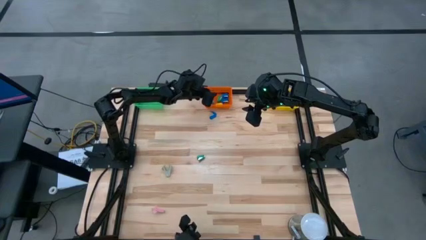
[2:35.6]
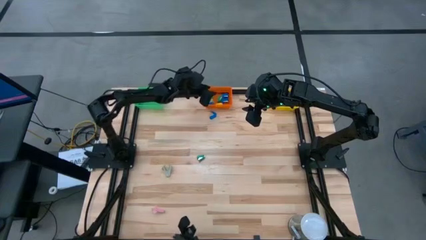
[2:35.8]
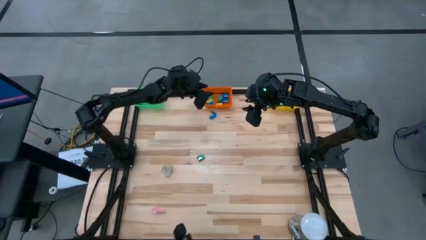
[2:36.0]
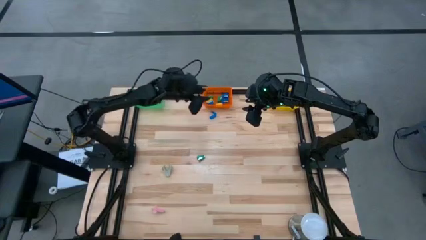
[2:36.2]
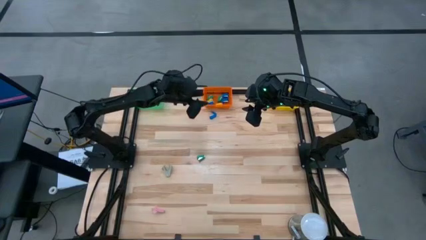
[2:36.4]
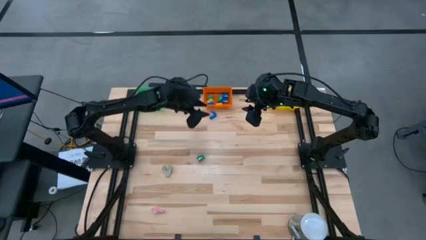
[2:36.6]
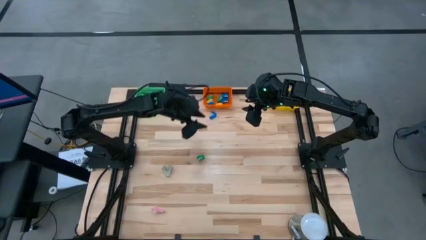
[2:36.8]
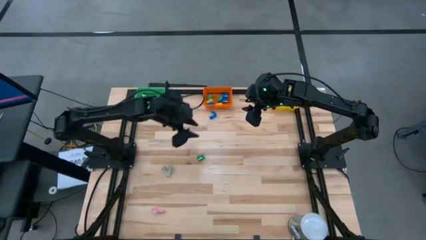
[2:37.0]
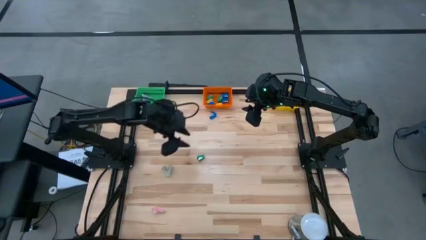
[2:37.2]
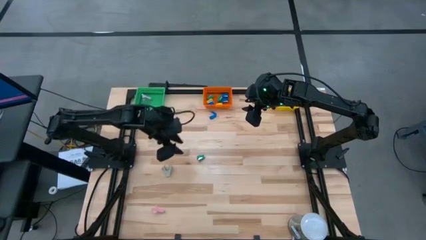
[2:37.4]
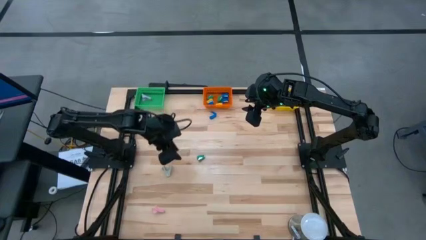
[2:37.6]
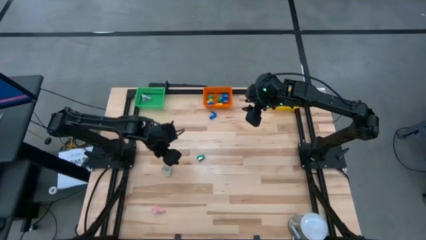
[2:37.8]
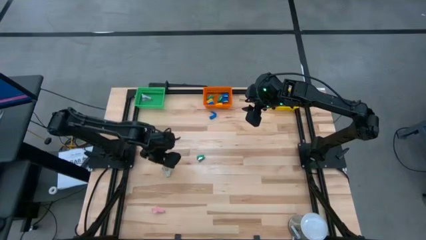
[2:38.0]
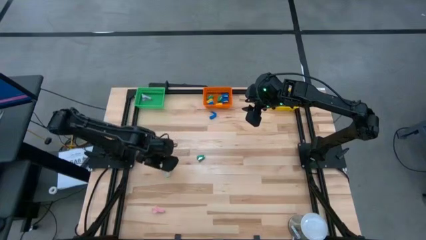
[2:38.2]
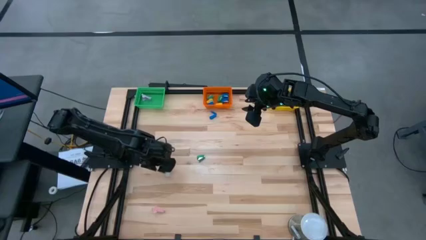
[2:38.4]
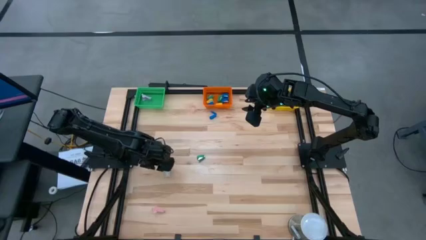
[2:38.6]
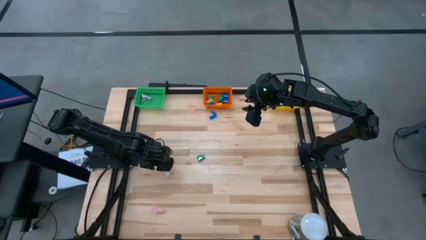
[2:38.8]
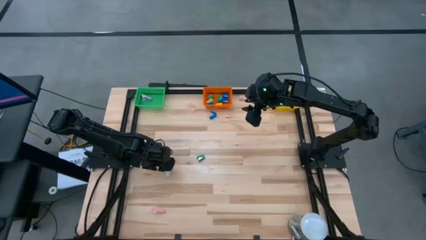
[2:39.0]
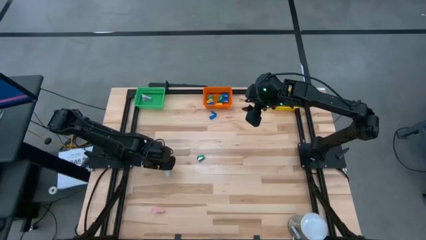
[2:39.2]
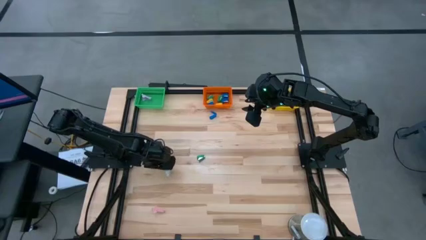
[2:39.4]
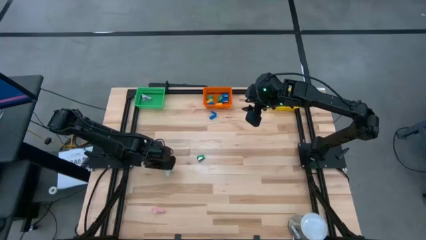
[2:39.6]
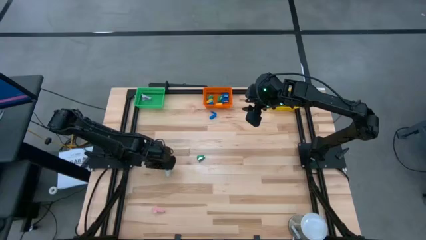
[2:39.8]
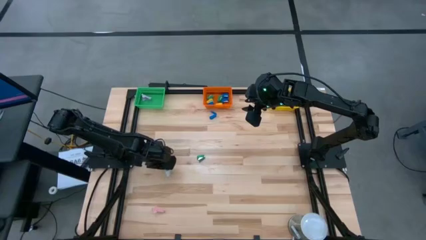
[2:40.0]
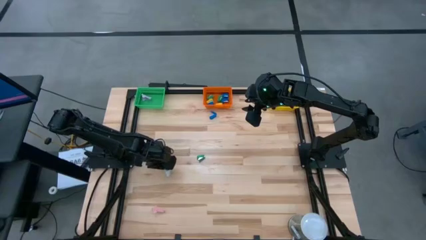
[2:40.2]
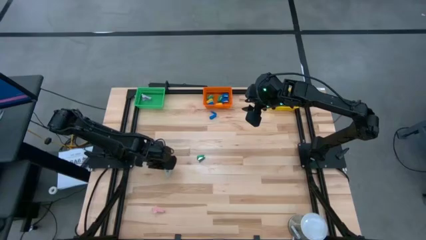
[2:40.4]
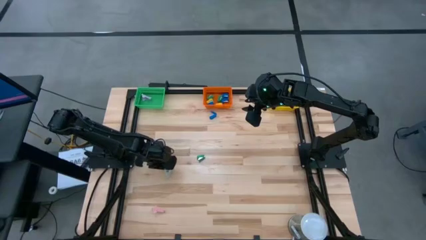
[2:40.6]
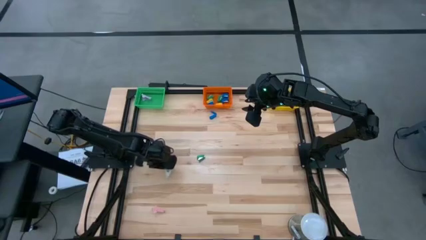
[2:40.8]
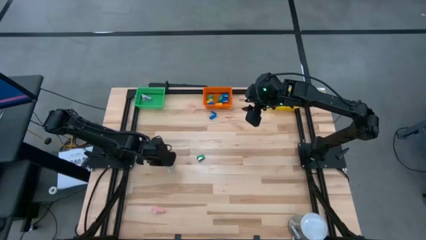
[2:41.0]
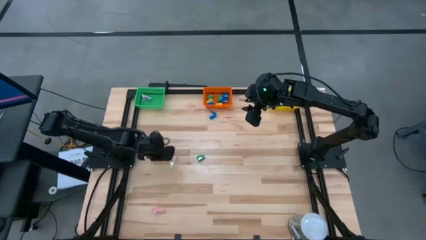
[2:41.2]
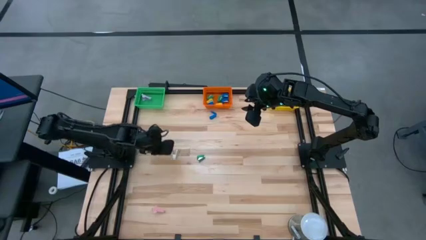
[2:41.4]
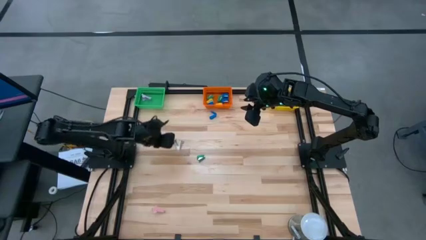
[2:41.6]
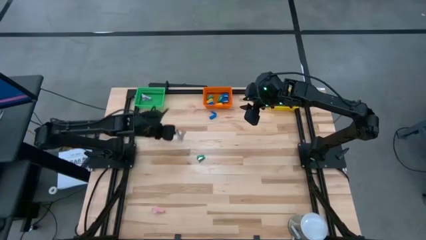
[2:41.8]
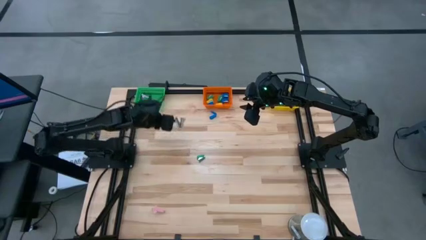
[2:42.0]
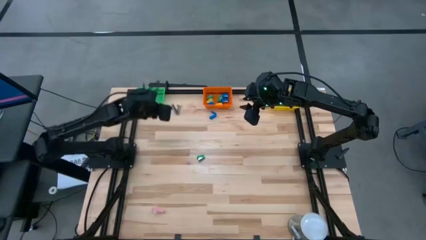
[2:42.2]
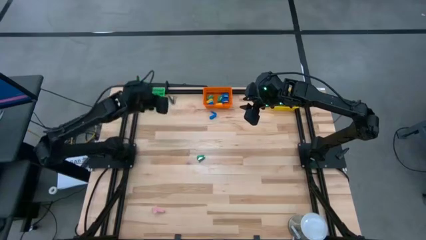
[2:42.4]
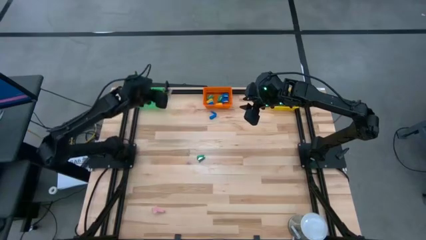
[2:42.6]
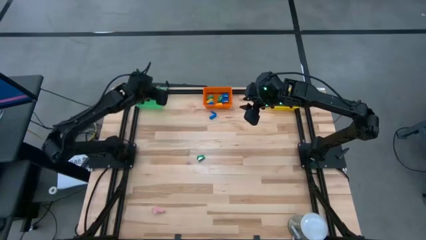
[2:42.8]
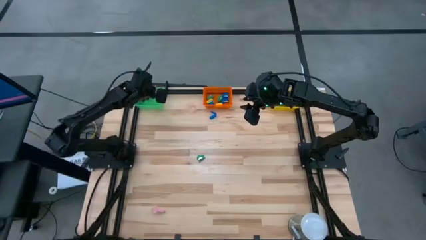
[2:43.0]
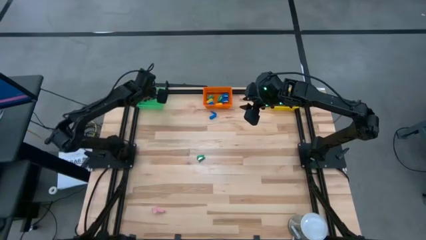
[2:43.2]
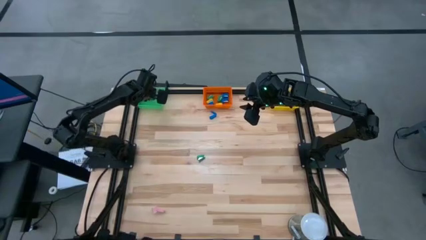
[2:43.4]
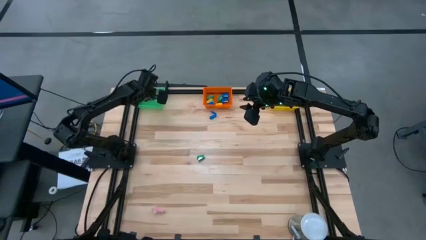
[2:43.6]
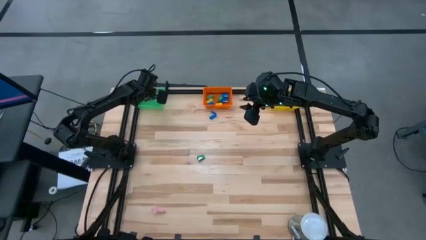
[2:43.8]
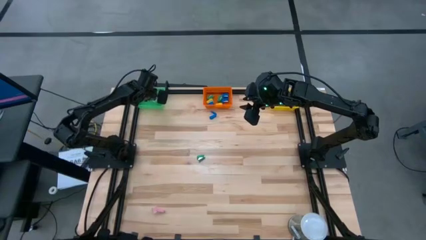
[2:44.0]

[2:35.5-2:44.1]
Task: Pick and place Stapler, Stapler remover, tape
Put the gray staple remover into the green bin

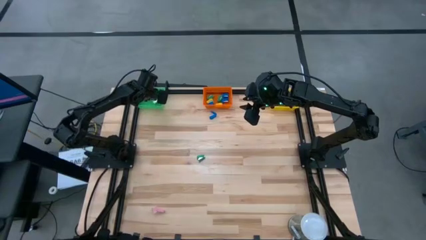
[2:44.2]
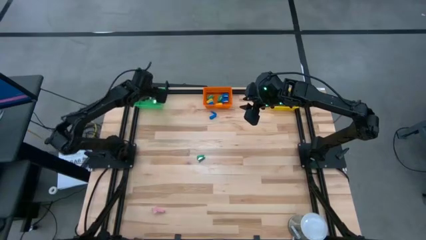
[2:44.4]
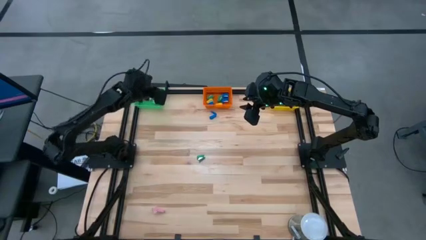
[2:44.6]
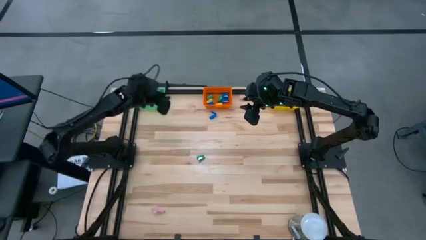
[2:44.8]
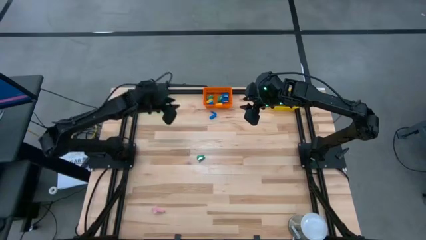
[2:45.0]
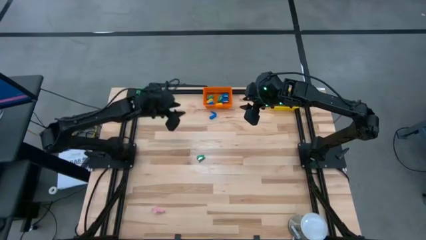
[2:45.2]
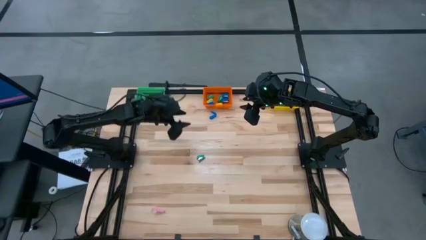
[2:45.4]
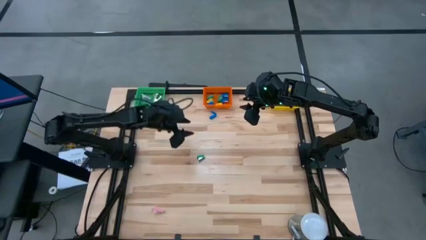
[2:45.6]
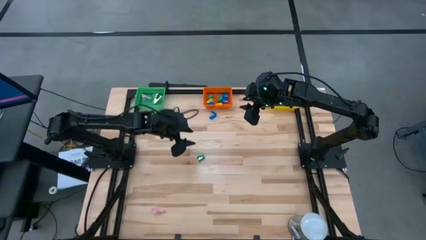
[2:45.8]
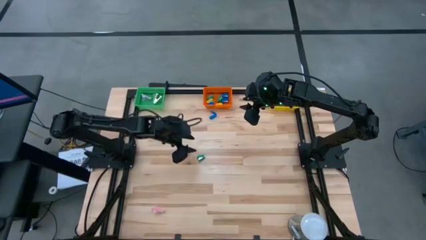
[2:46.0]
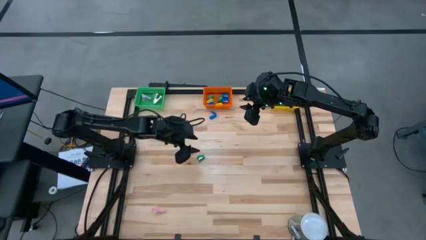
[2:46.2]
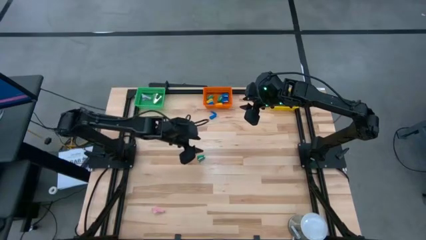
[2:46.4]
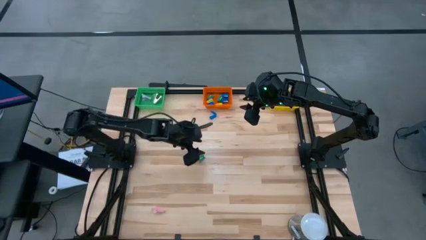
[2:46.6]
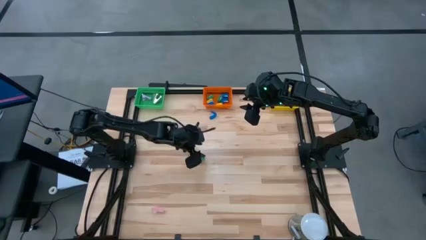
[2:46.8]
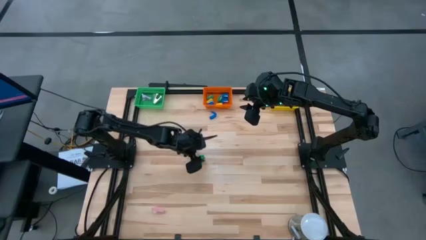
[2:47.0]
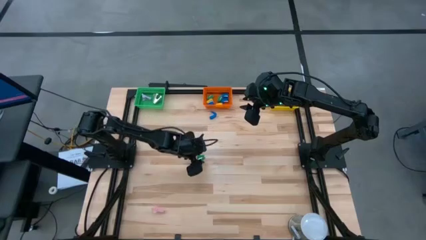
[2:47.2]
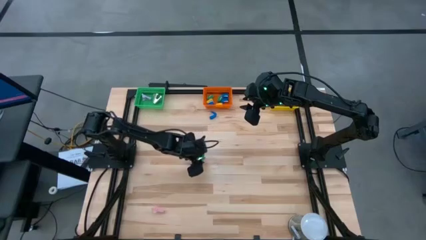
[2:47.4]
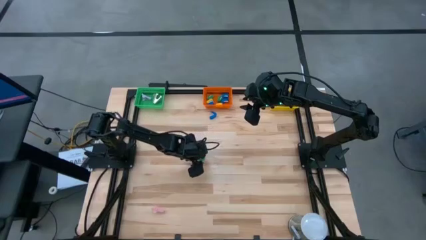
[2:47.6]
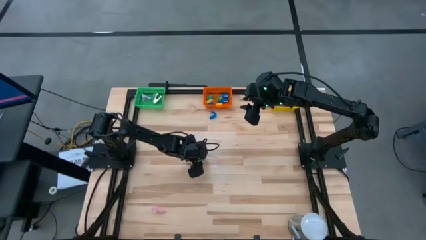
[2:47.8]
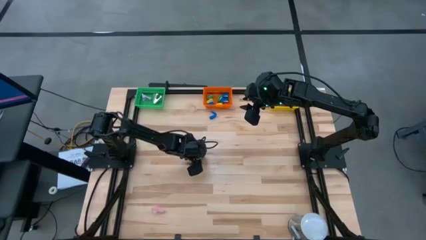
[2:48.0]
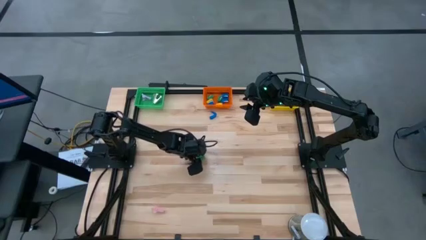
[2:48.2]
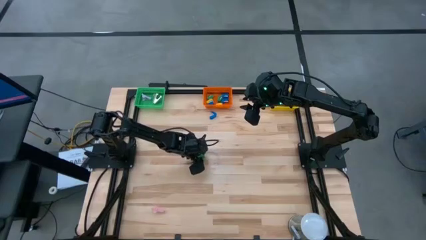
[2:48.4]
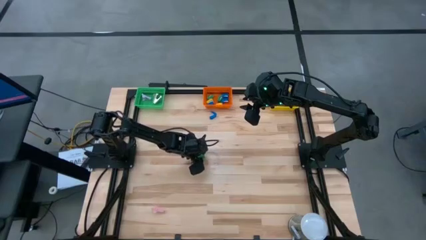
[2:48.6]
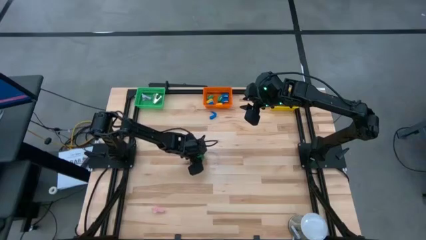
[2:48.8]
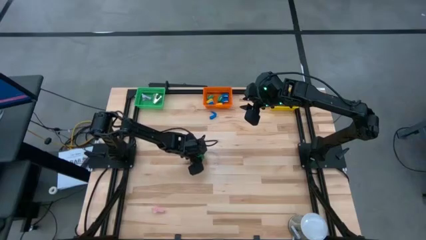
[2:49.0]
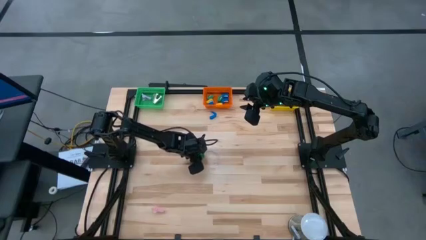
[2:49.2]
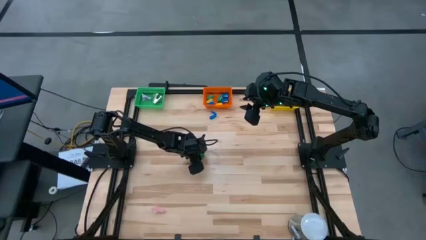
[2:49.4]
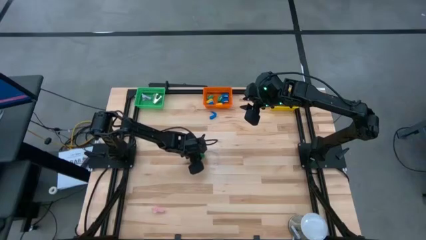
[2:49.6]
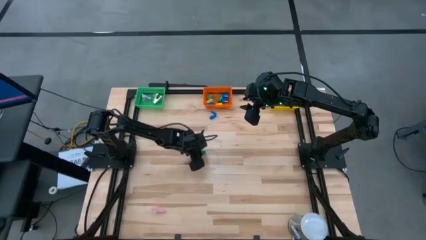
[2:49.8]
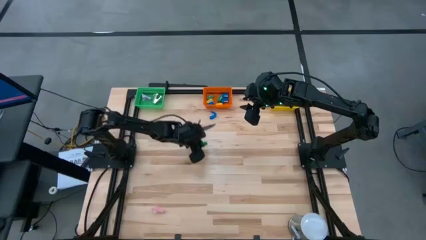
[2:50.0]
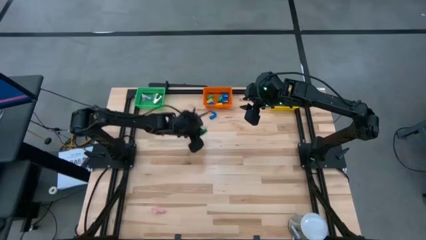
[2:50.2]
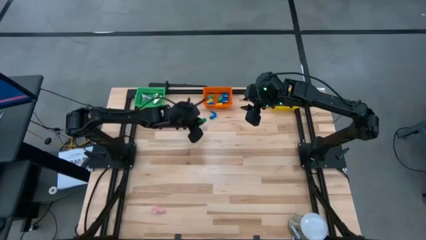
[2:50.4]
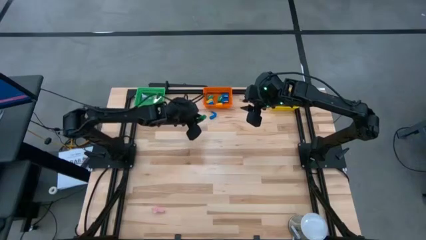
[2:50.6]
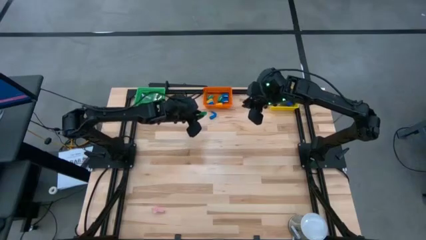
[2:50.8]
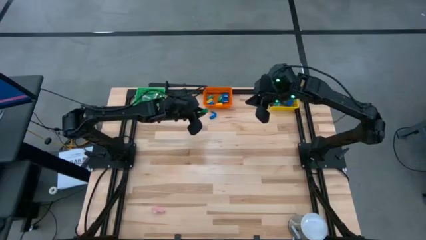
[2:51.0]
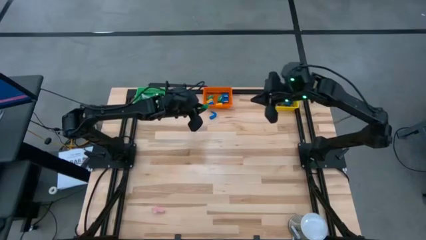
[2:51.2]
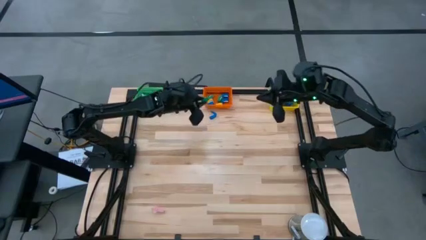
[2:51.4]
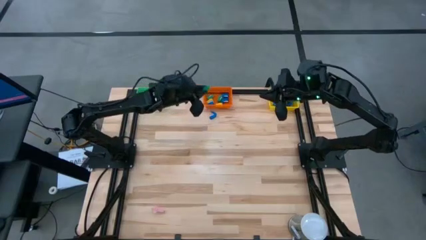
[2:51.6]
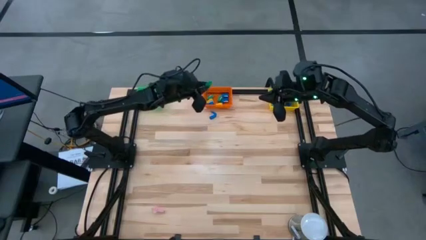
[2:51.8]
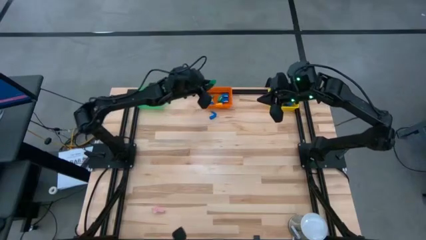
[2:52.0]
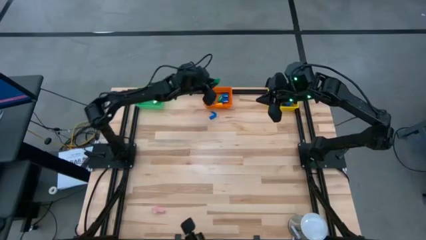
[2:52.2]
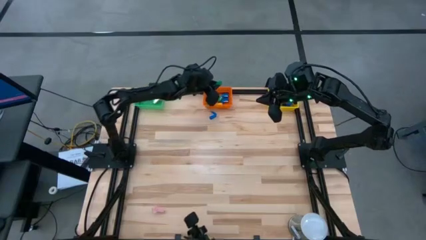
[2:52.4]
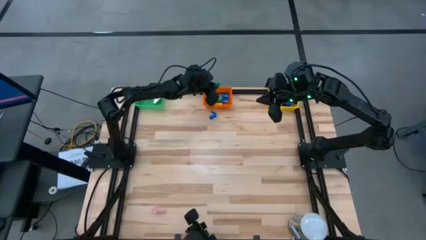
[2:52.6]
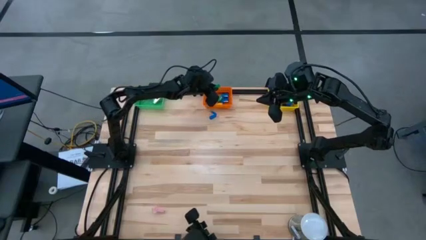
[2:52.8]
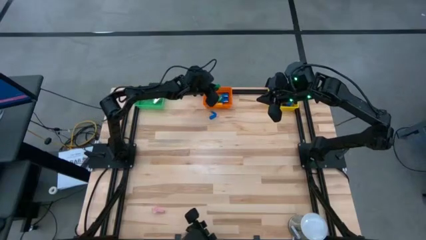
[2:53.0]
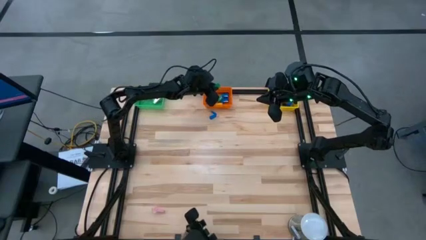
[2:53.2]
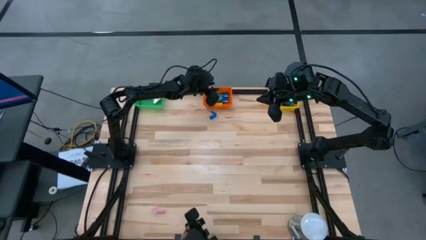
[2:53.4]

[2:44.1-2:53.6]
Put the green stapler into the orange bin
